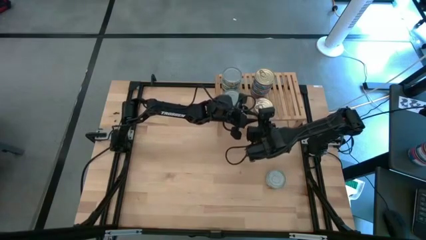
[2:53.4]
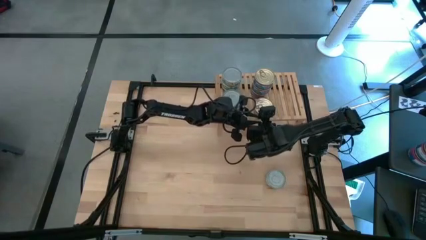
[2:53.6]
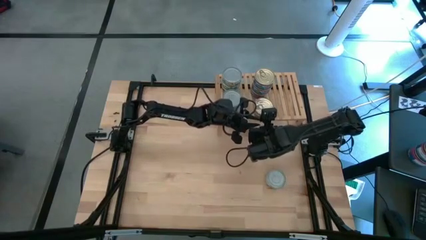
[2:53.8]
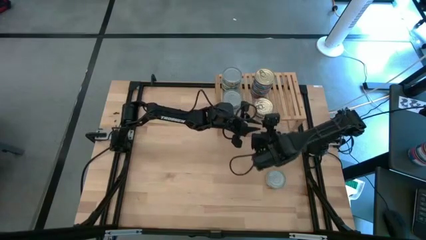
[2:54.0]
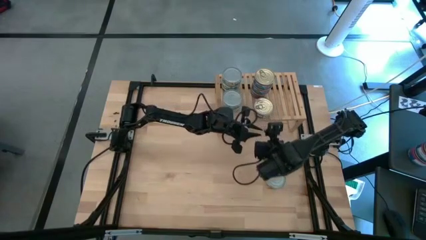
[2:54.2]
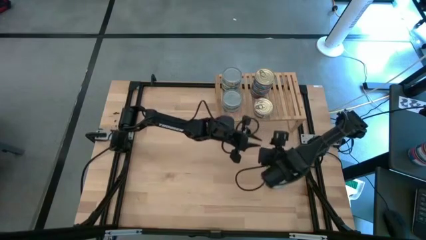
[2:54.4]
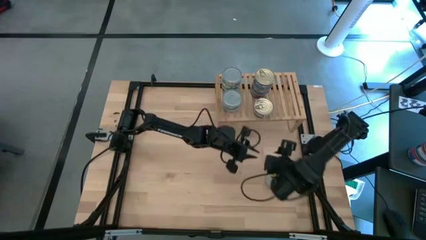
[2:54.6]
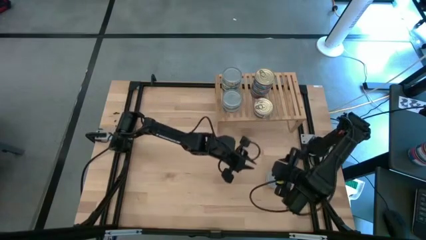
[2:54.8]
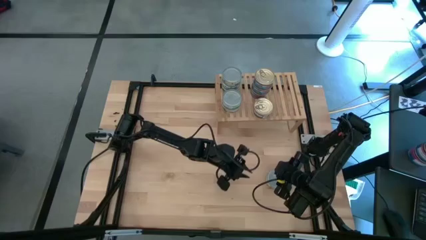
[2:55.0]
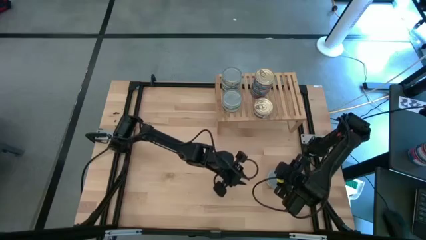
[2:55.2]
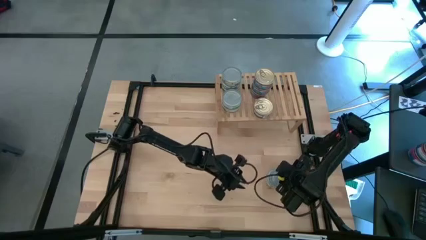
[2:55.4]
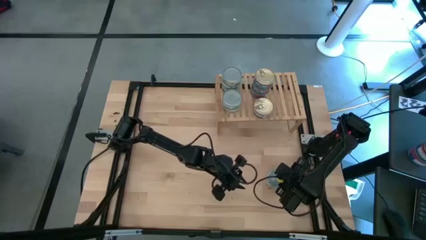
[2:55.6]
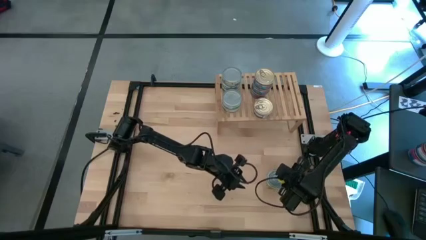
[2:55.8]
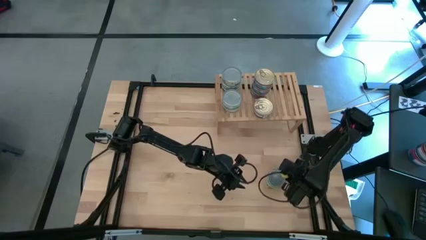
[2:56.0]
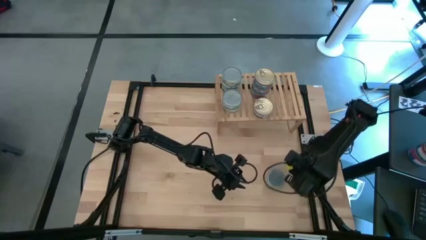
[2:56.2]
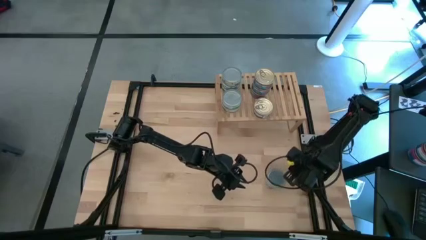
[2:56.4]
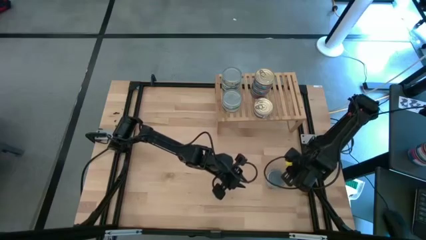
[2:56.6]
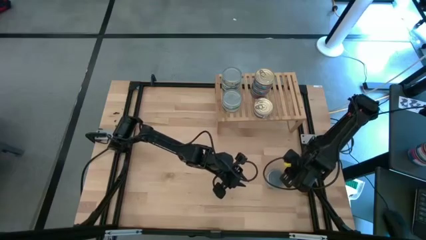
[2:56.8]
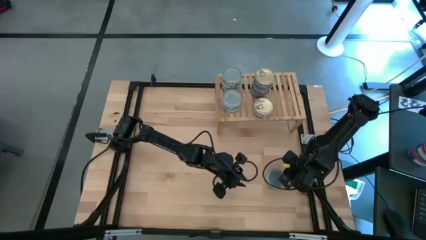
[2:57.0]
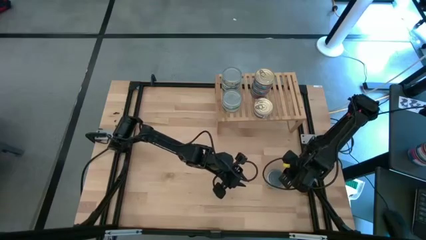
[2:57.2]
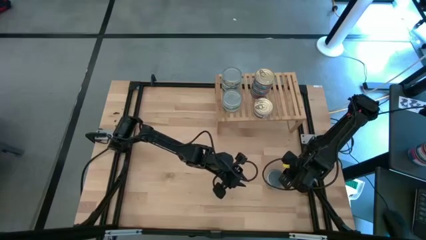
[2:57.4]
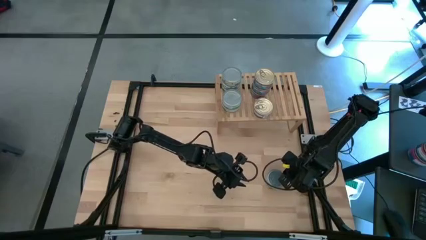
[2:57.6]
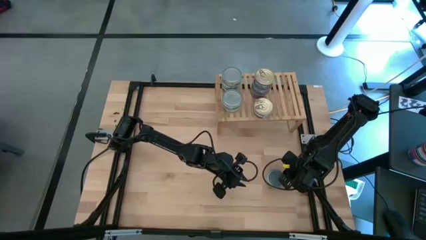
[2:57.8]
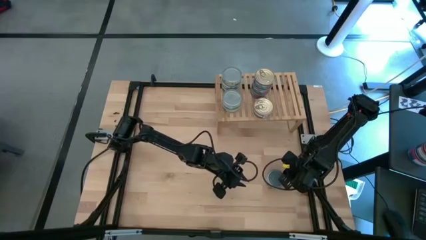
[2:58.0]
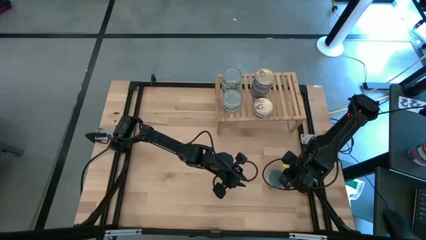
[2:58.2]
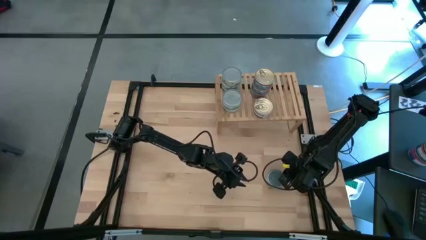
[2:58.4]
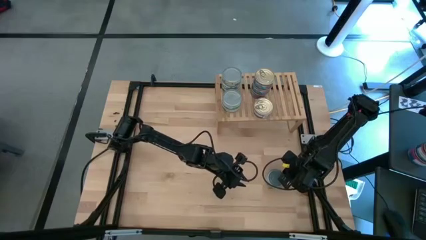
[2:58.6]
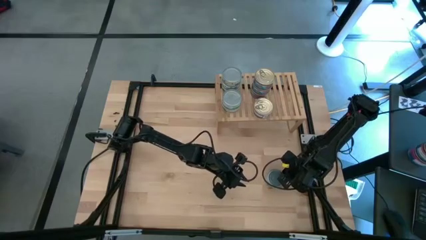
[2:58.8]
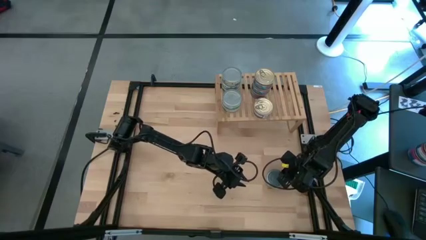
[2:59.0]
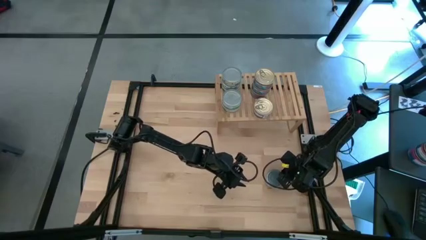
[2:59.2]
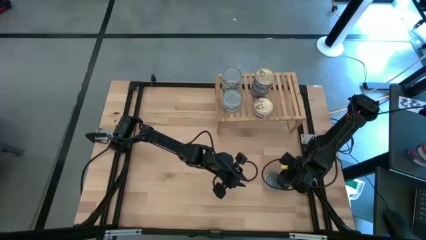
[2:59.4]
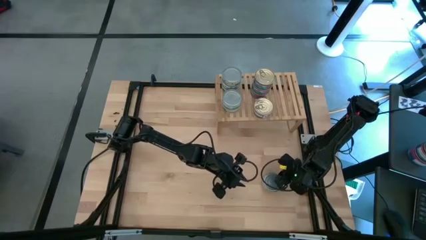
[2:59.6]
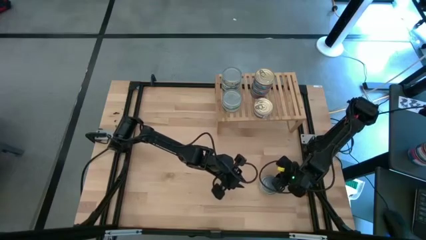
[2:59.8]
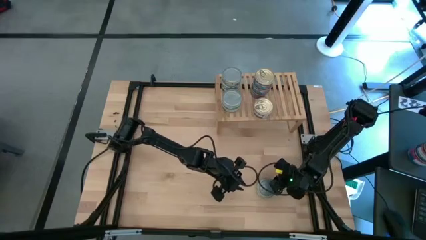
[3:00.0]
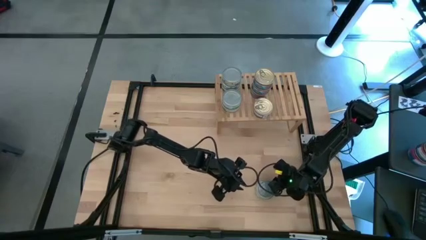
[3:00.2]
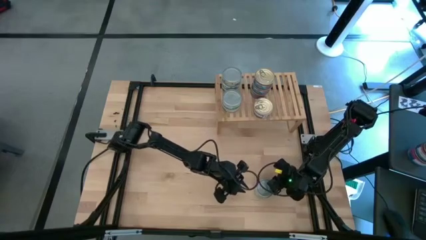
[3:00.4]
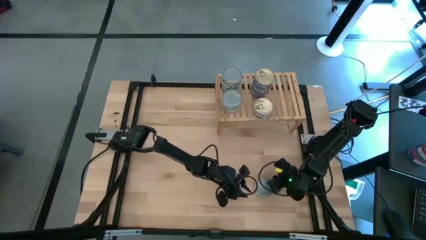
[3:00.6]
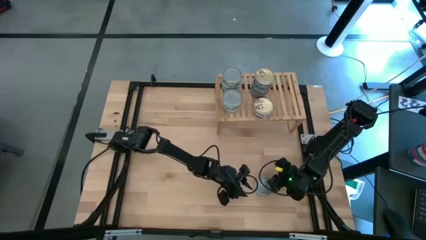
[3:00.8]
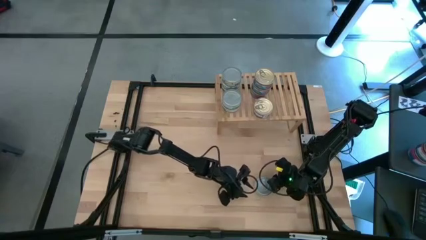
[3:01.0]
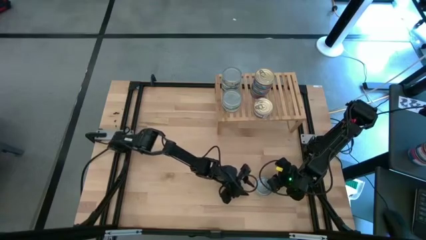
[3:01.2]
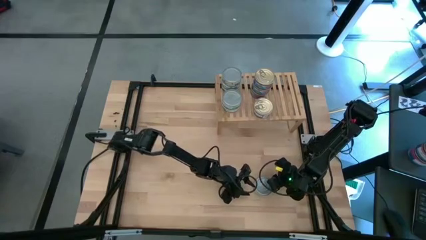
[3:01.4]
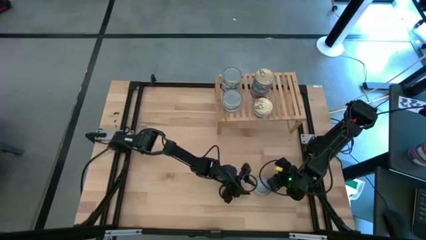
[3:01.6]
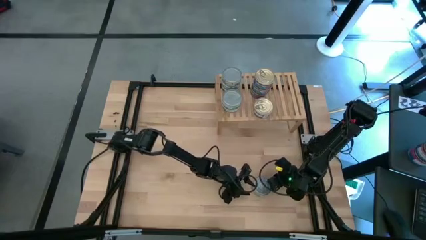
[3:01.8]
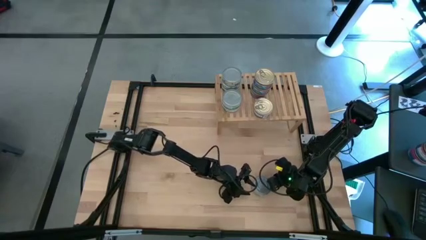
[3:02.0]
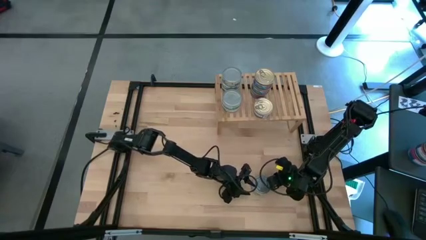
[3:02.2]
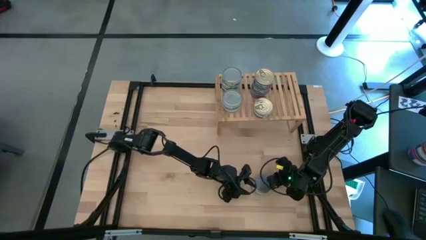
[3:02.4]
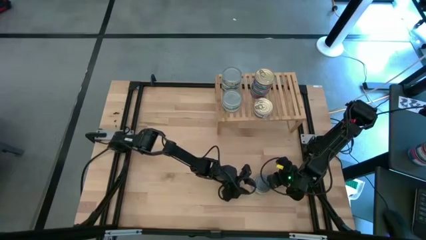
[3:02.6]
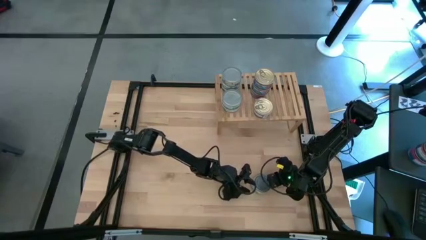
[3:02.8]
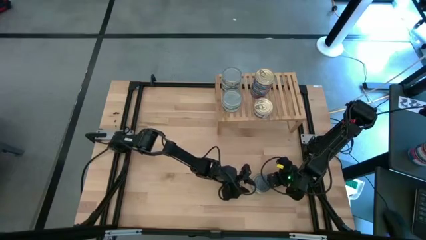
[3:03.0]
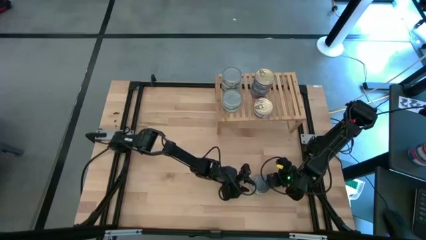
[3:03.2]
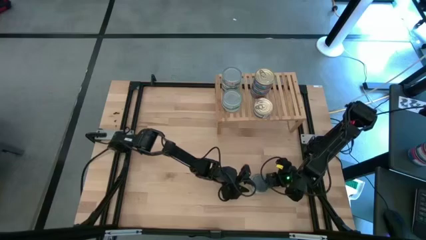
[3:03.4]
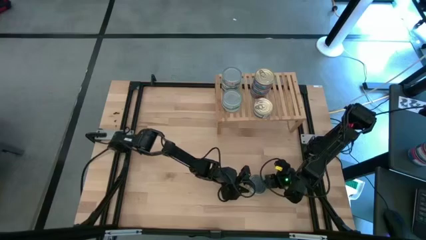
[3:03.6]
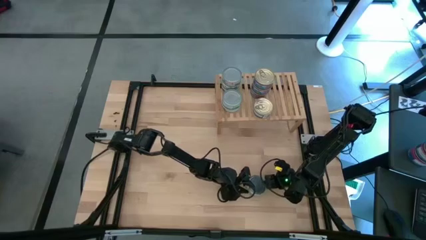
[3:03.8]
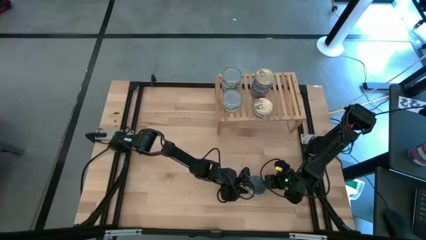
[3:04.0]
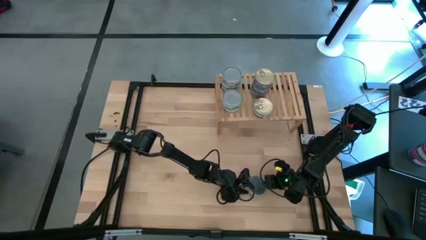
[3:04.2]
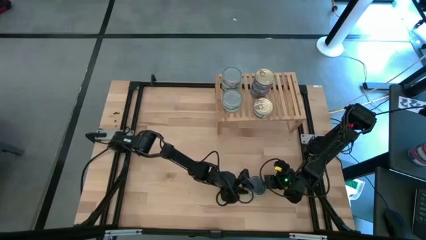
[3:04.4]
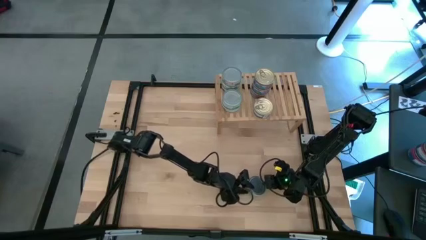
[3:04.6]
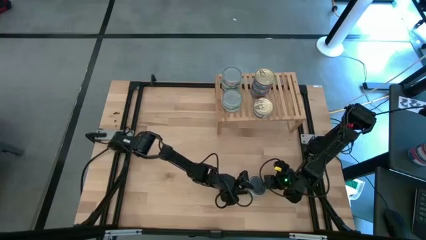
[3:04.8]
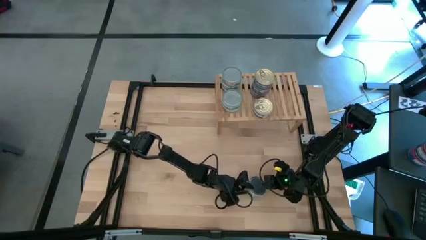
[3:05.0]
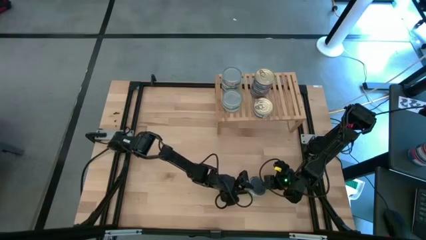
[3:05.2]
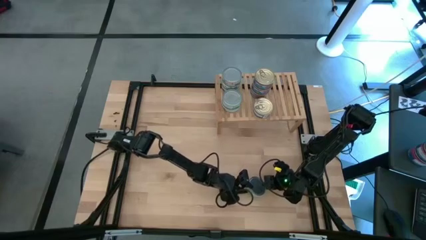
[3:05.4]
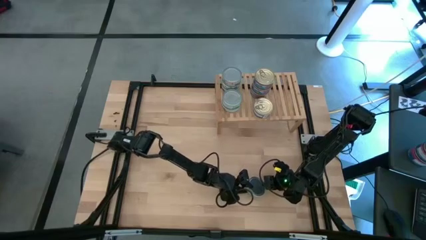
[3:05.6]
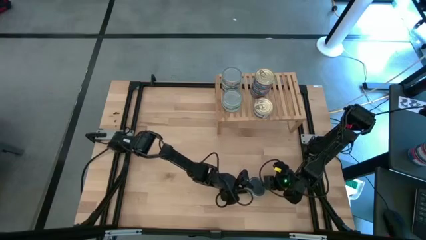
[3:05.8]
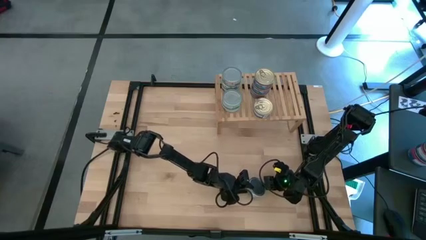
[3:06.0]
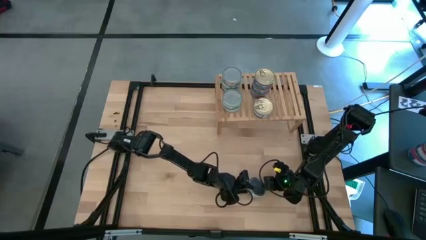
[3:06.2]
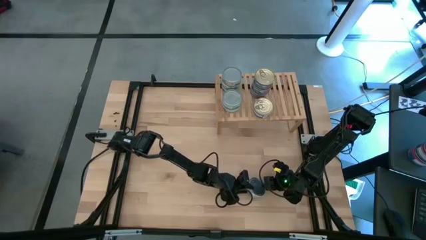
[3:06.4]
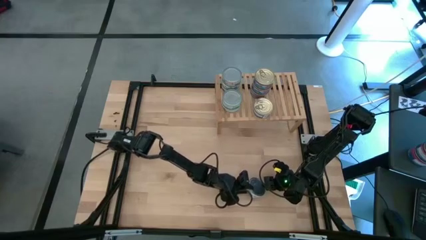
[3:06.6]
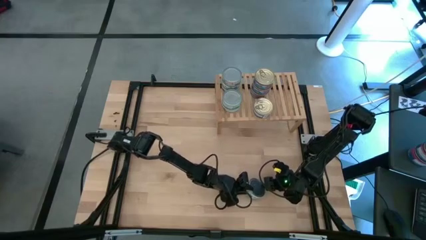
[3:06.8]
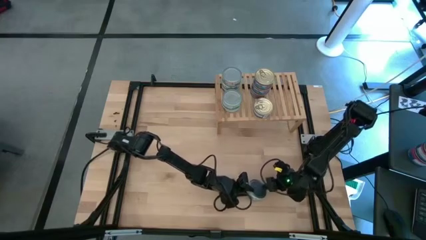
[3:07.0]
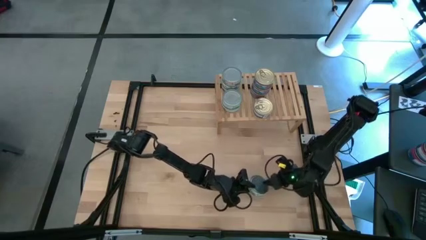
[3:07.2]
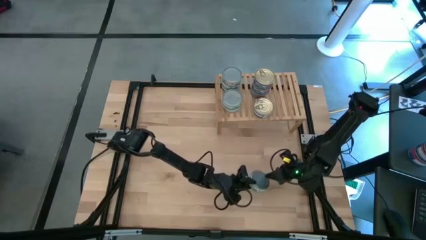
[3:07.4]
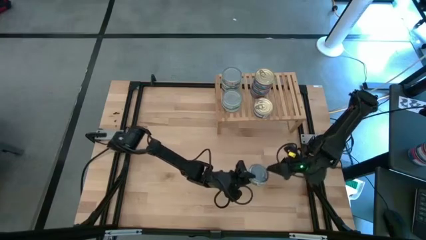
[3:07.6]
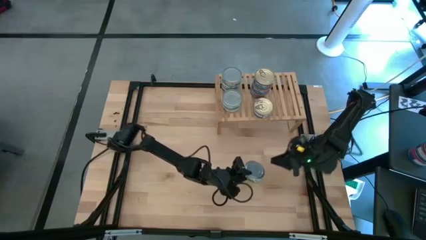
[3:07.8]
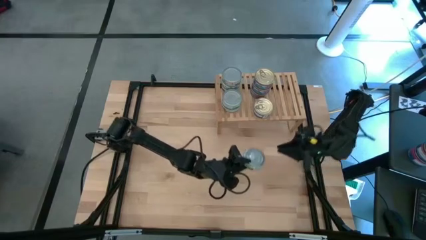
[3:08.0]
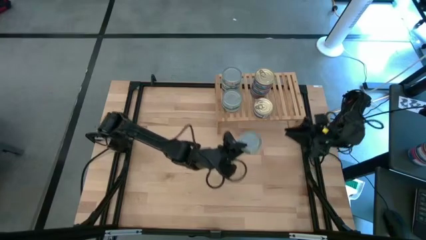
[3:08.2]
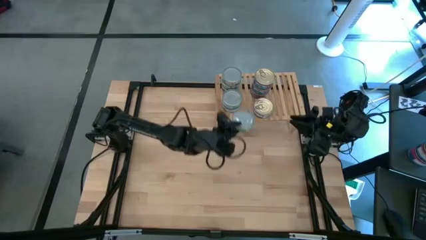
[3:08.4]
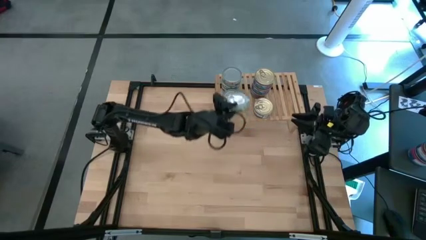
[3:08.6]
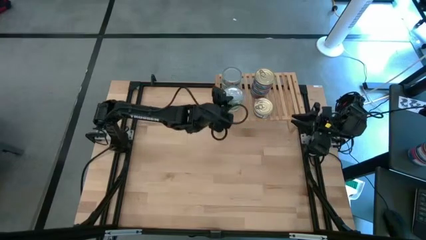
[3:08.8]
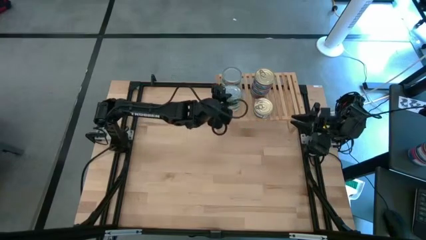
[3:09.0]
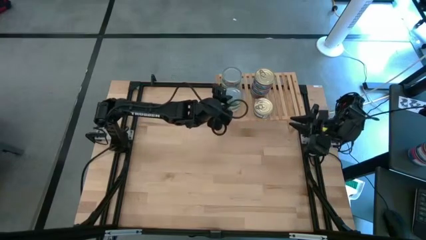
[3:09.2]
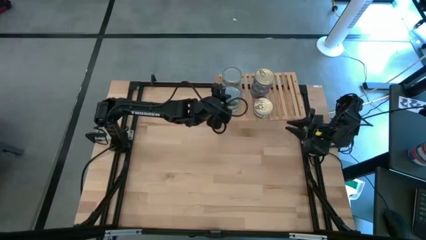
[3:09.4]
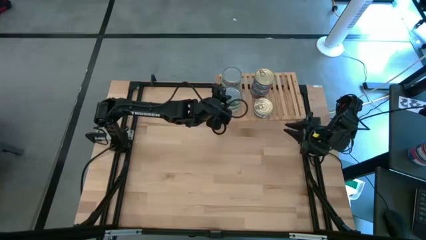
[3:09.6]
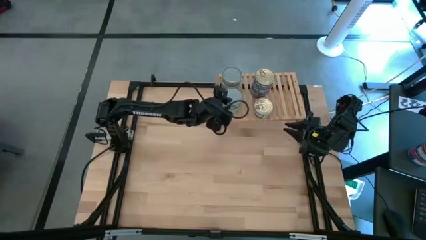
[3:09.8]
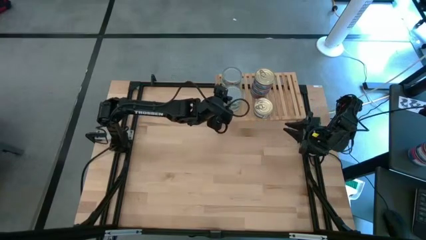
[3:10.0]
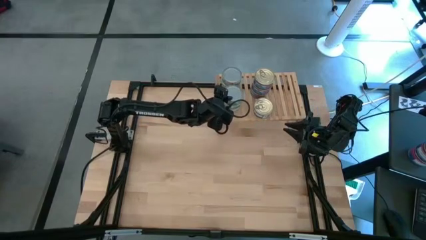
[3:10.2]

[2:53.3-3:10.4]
Task: Stack canned seafood by type on shelf
Stack the green tuna can on top of the green tuna cans on the shelf
